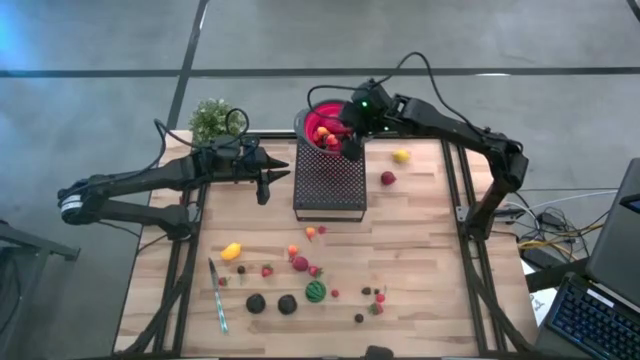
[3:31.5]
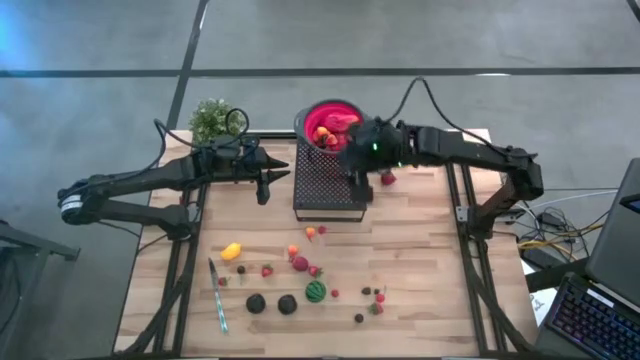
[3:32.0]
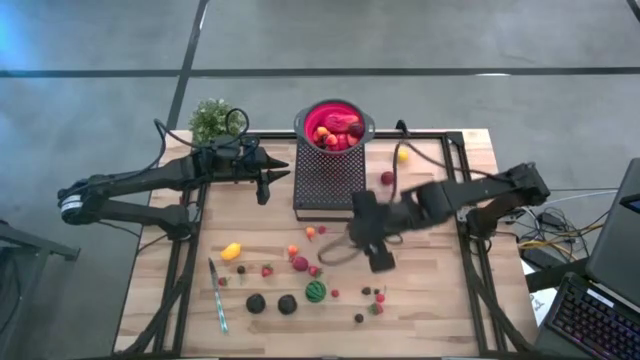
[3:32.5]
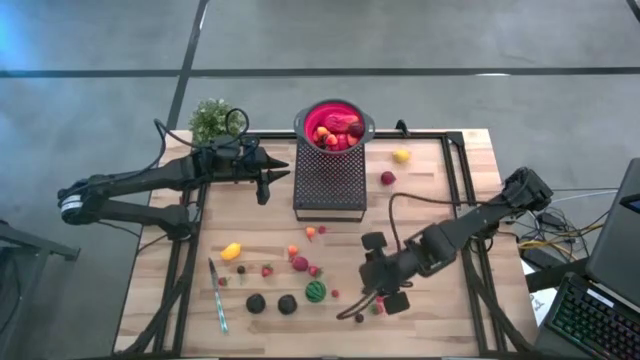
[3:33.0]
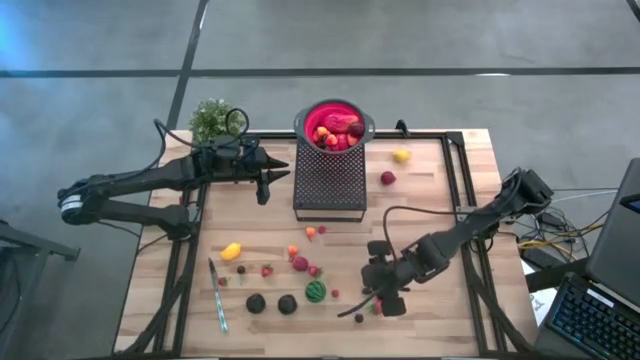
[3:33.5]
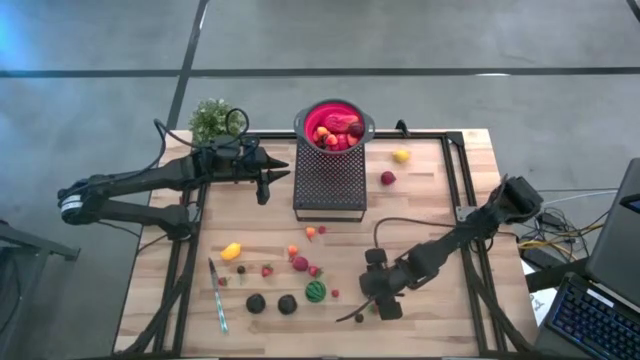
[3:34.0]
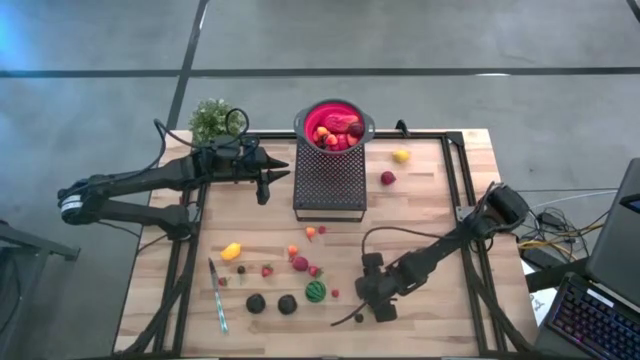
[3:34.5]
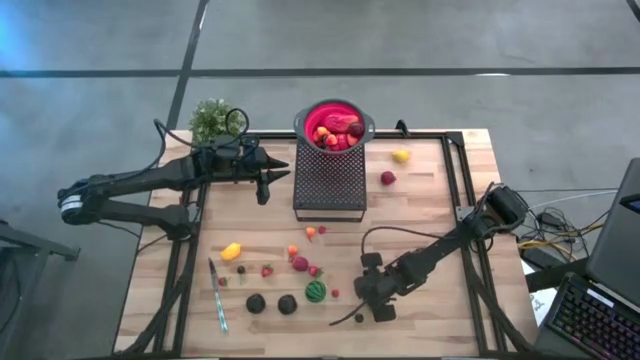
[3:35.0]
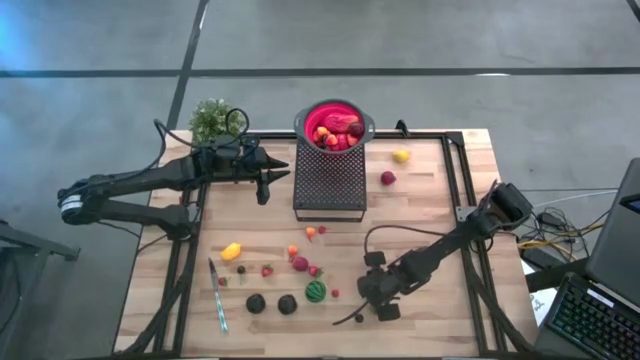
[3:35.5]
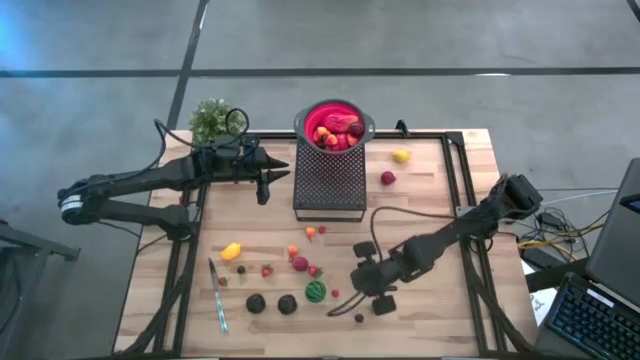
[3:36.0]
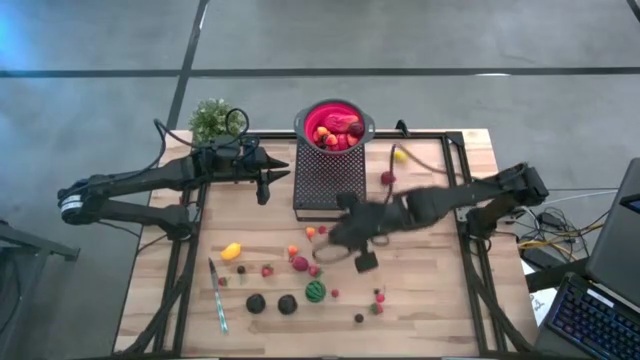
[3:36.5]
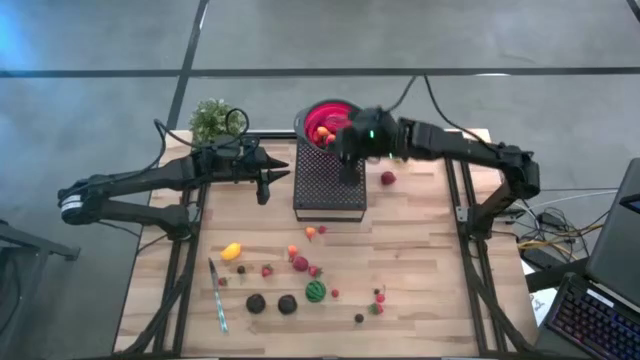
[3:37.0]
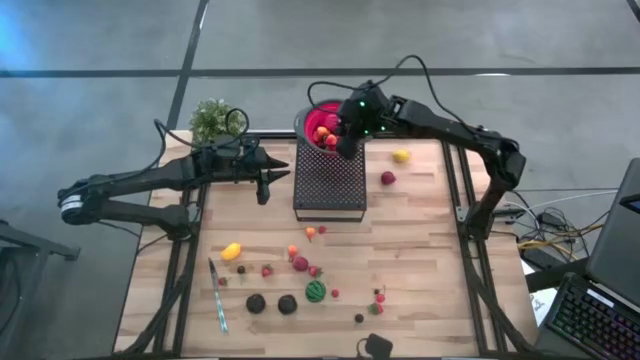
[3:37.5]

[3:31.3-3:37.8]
Task: Pick & Place Fruit
Put the black berry into the red strainer bowl on the shelf

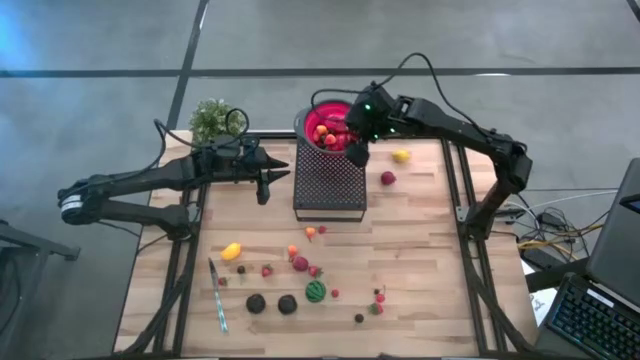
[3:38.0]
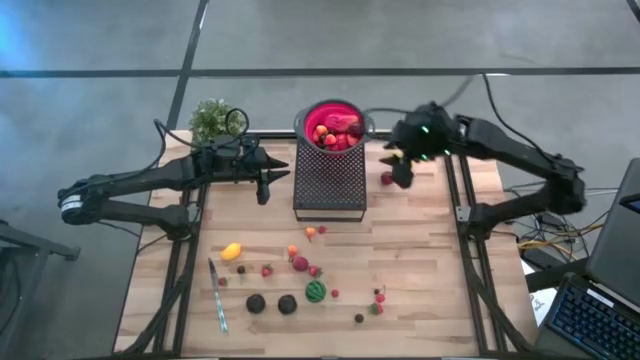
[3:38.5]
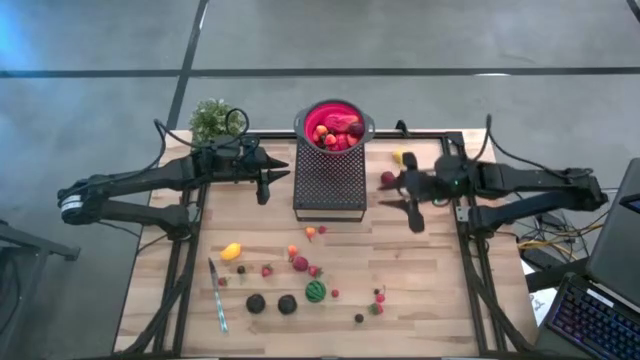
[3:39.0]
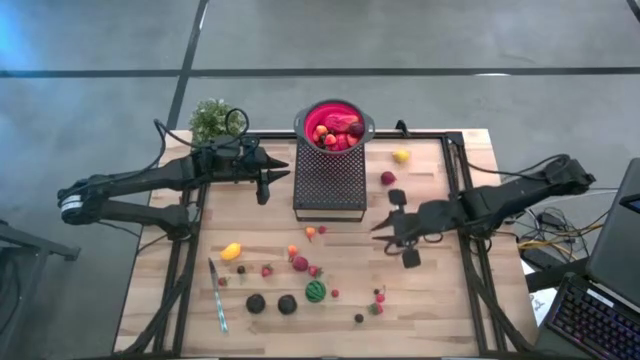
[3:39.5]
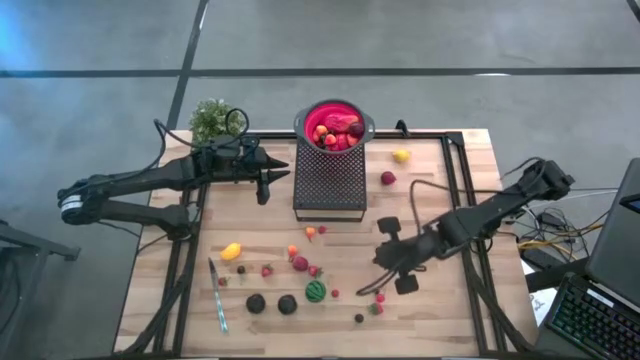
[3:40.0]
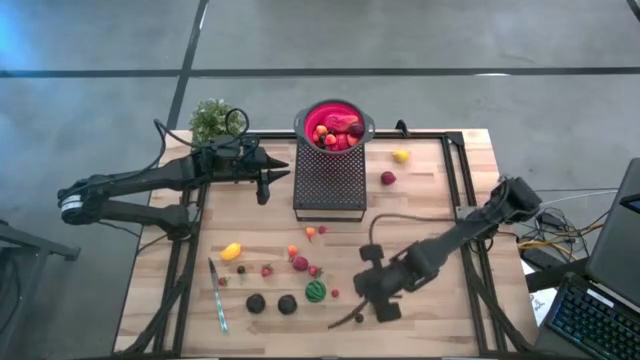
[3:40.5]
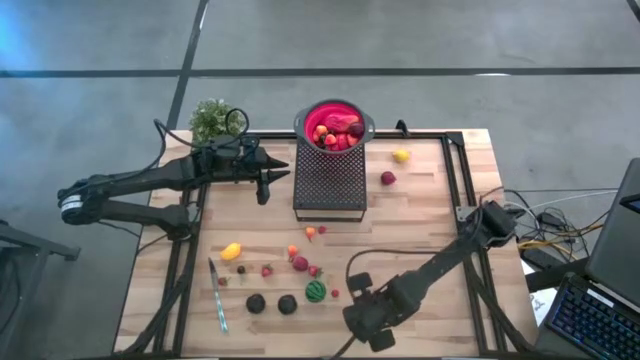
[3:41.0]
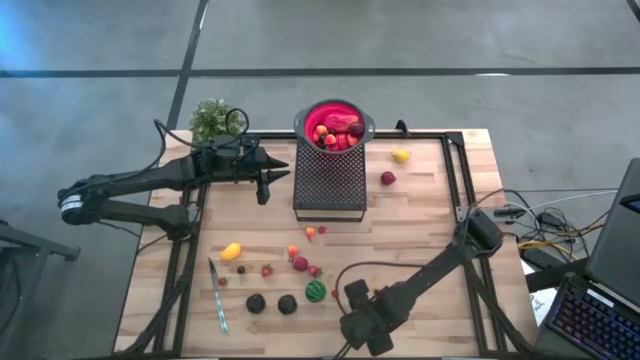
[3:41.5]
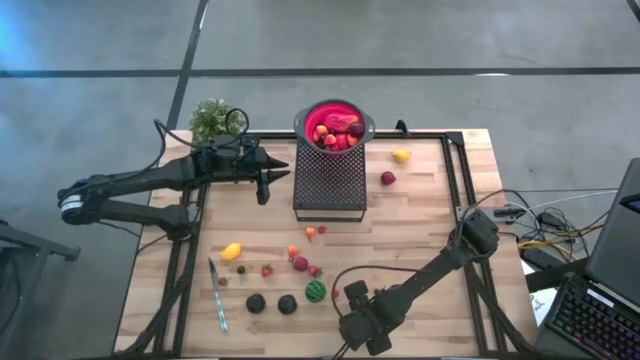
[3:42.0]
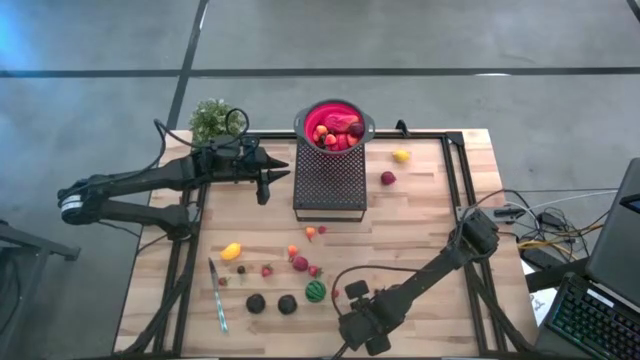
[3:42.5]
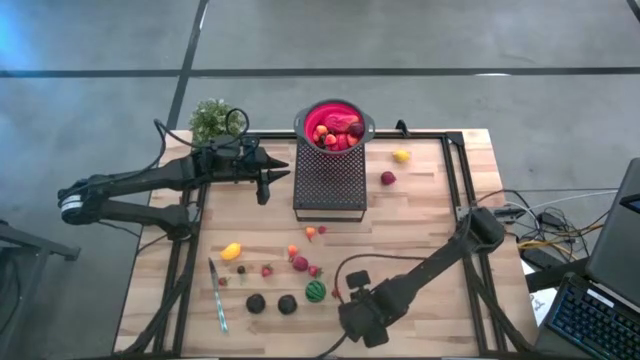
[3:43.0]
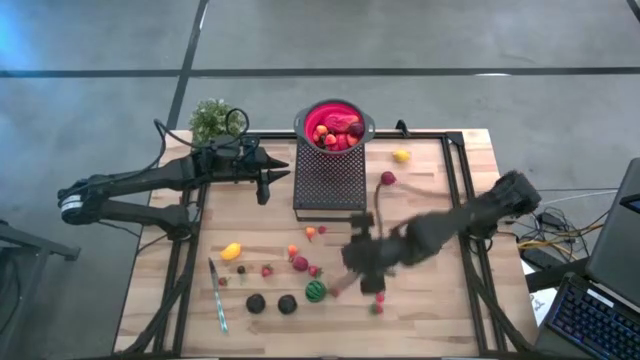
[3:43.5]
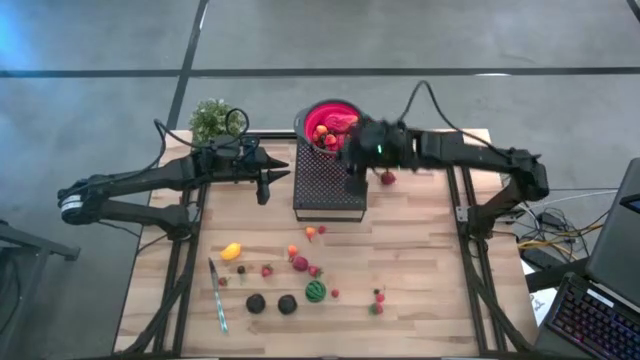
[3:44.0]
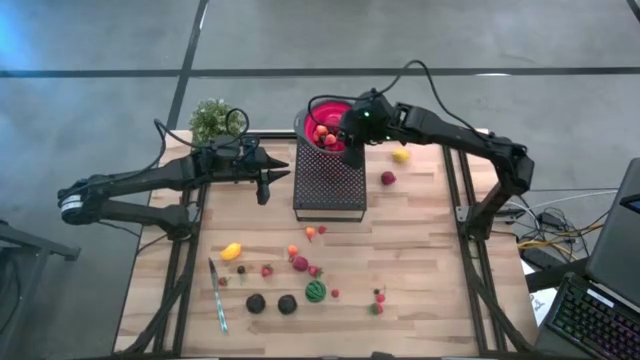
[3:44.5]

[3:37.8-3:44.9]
Put the black cherry into the red strainer bowl on the shelf

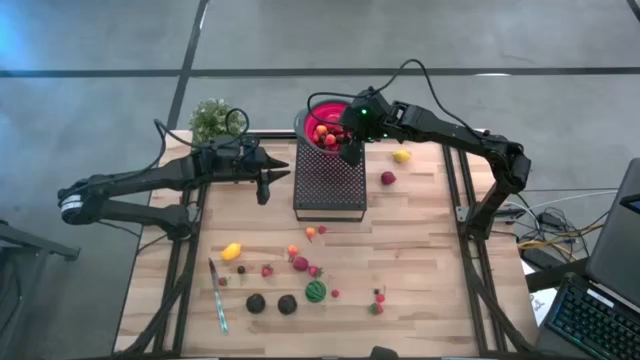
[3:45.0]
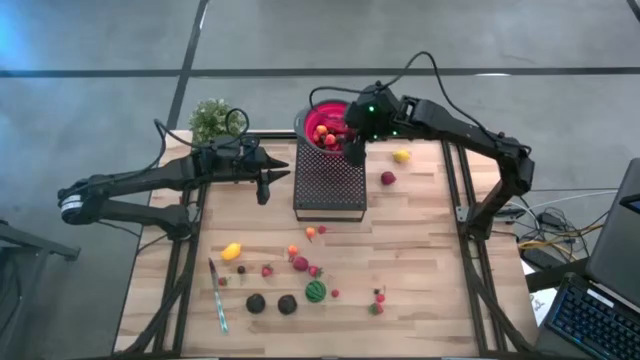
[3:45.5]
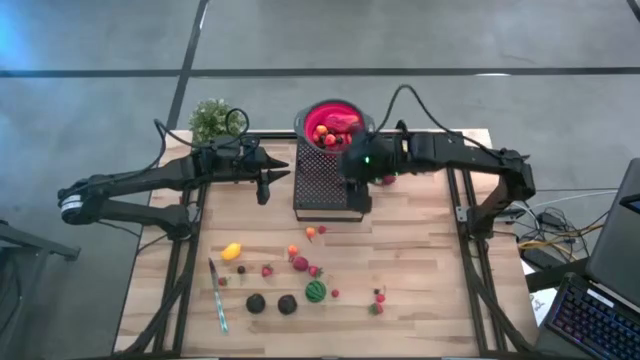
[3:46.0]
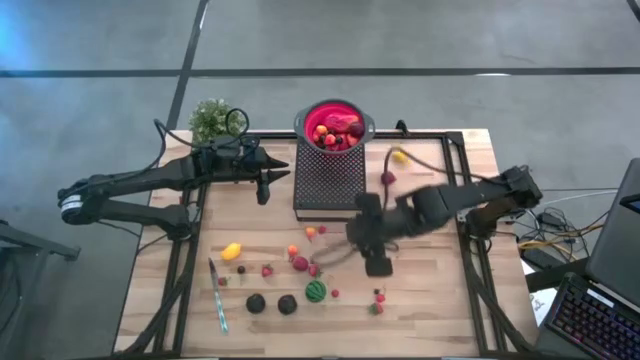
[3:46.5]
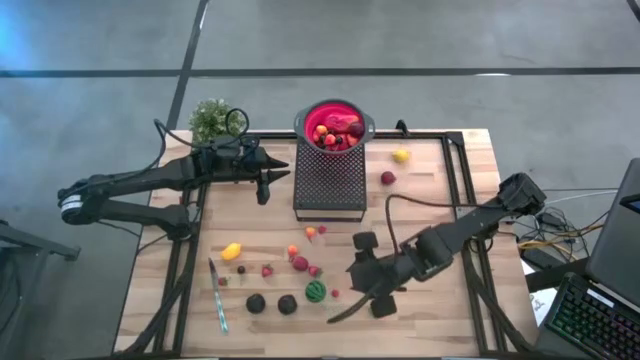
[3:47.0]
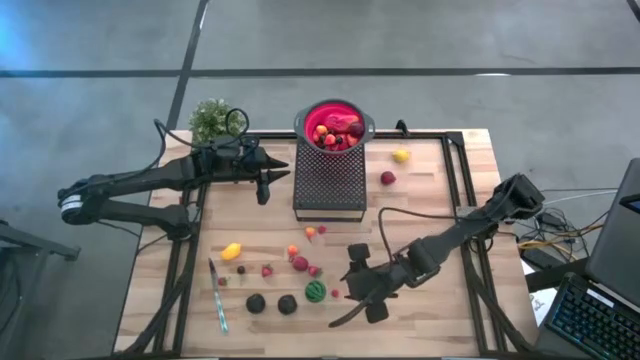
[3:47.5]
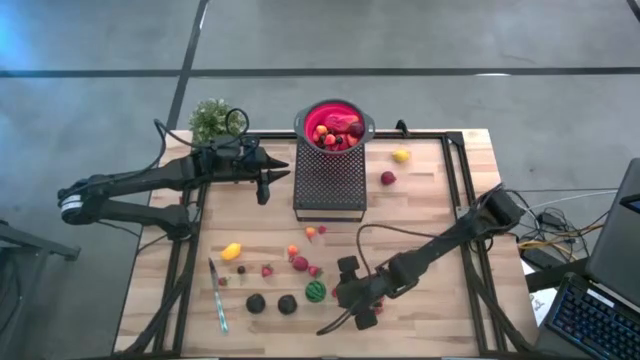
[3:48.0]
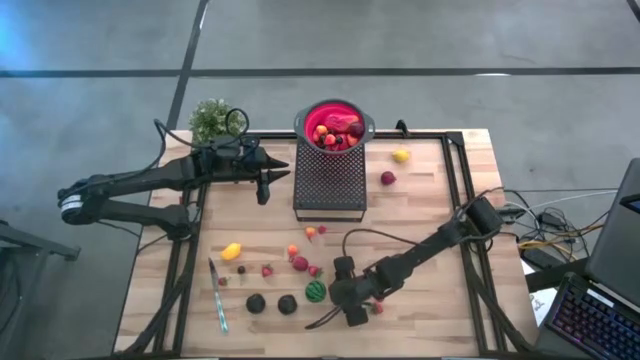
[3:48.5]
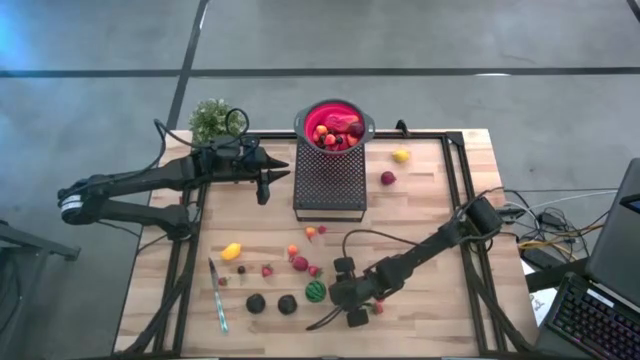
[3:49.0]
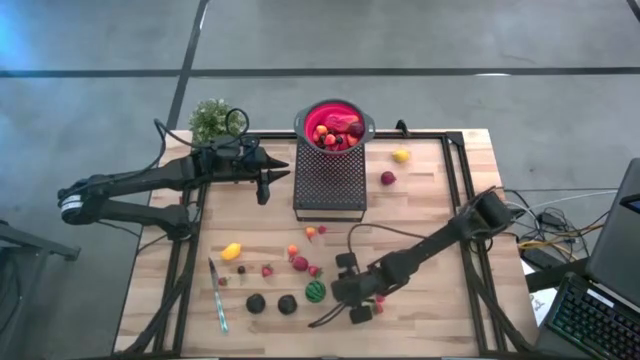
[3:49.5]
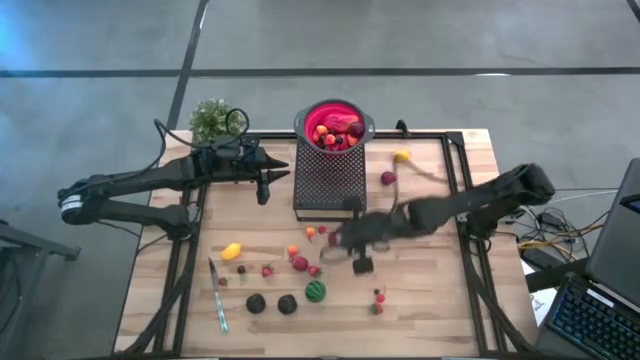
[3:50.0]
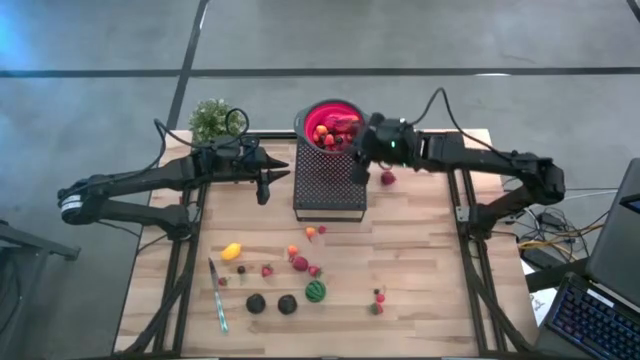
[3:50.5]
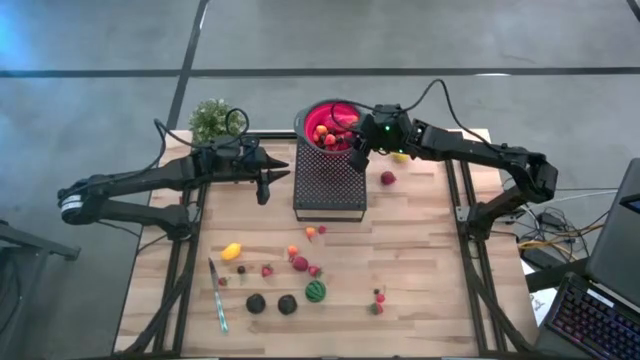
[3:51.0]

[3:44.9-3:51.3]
Put the raspberry into the red strainer bowl on the shelf

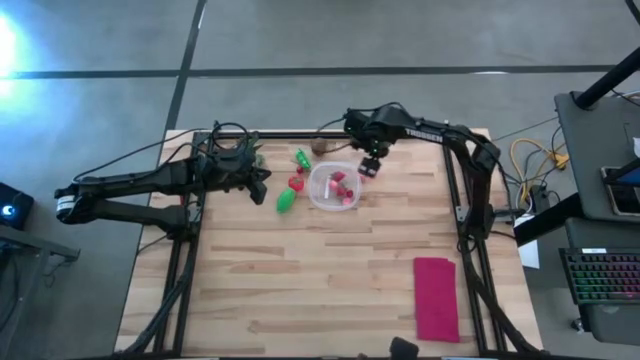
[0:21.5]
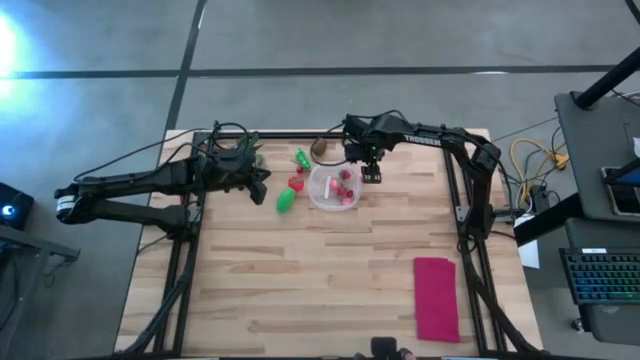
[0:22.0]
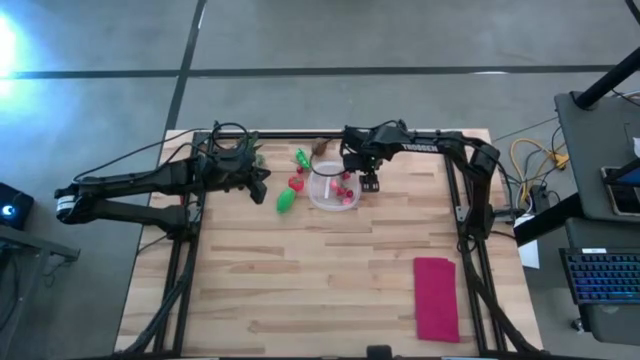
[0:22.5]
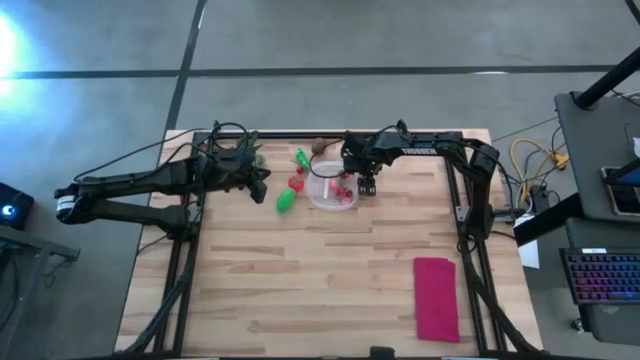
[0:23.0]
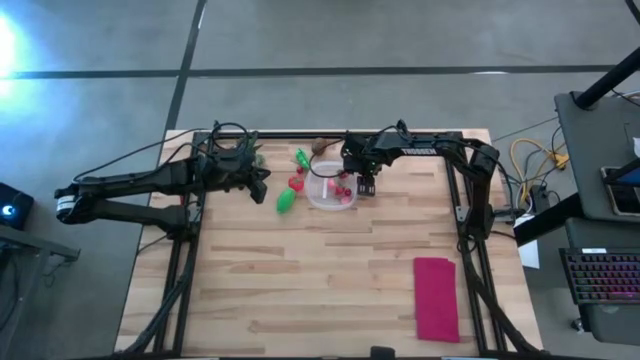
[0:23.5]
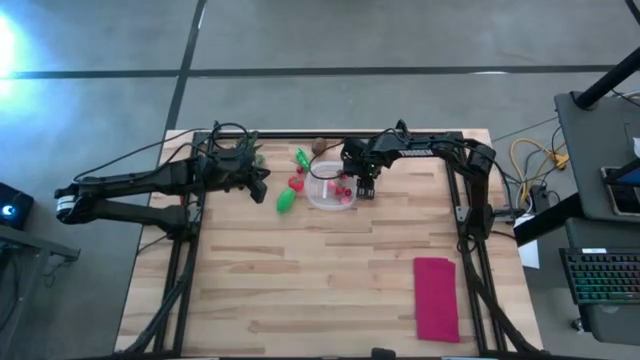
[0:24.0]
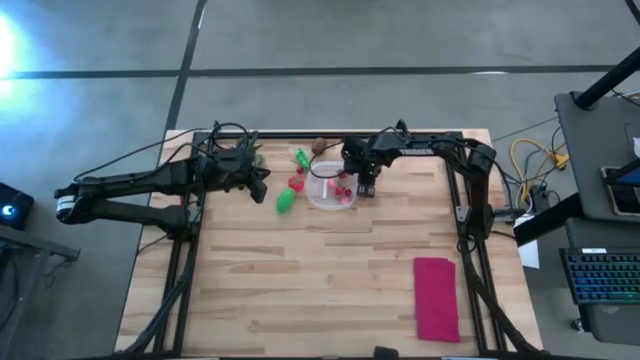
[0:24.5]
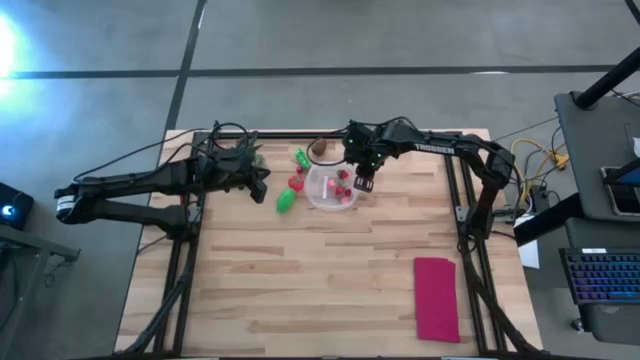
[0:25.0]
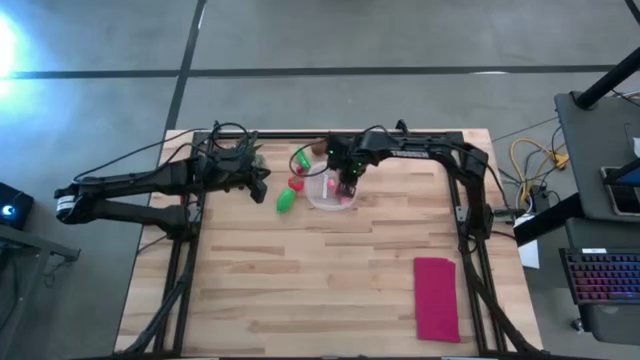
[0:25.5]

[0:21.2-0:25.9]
Task: Pick and placing Produce into tupperware
Put the peach into the transparent bin
